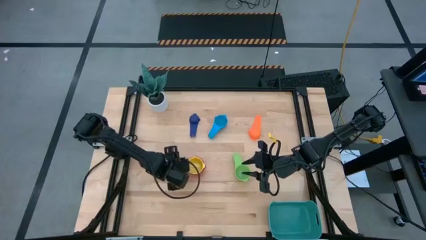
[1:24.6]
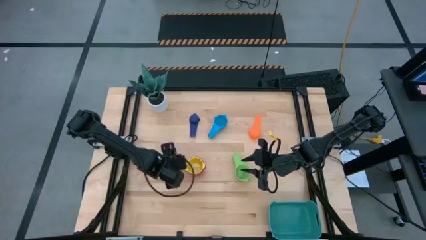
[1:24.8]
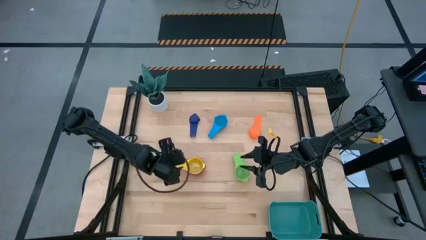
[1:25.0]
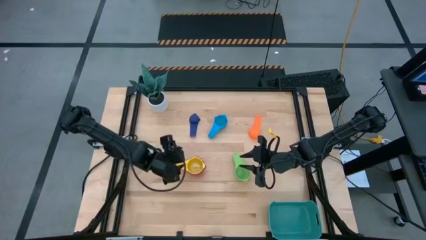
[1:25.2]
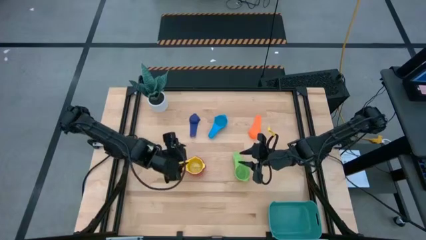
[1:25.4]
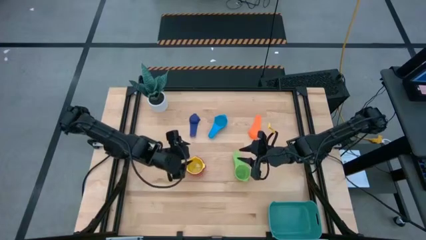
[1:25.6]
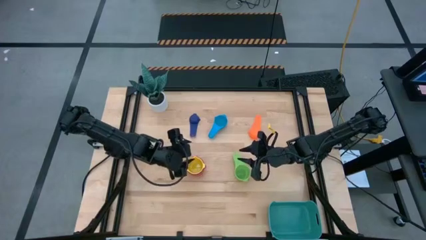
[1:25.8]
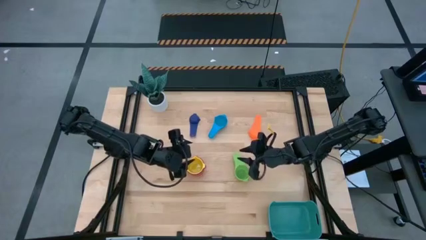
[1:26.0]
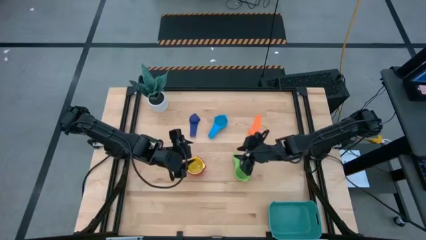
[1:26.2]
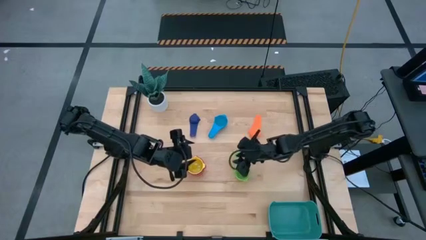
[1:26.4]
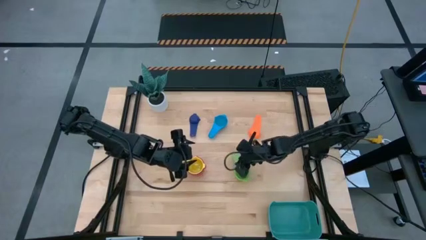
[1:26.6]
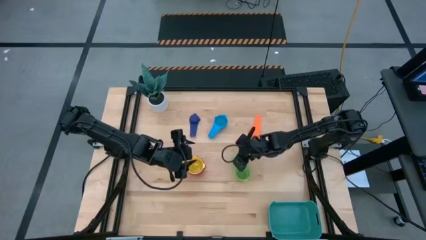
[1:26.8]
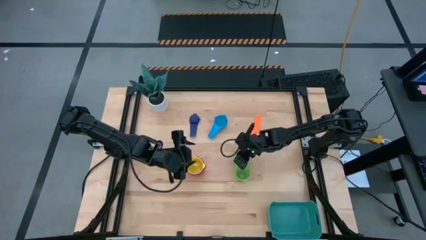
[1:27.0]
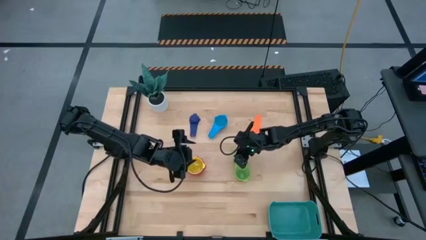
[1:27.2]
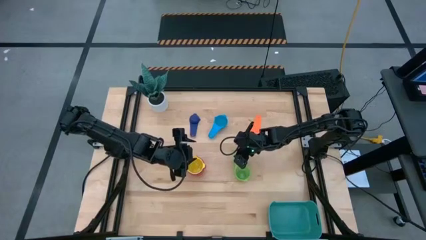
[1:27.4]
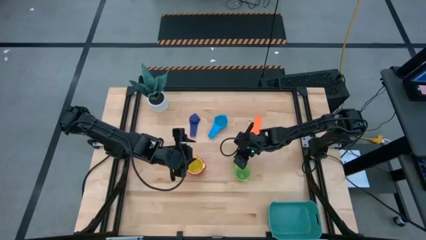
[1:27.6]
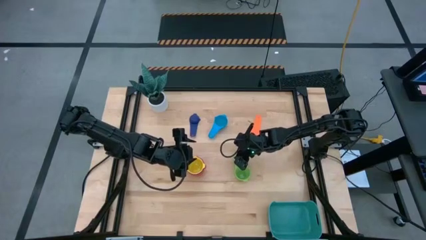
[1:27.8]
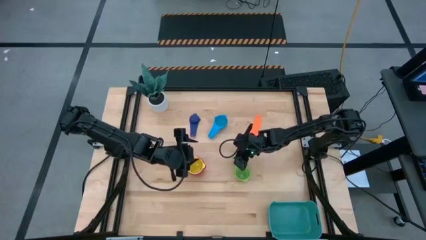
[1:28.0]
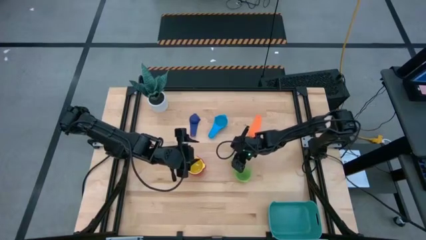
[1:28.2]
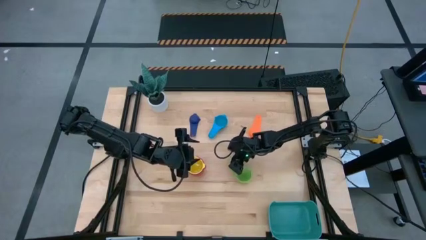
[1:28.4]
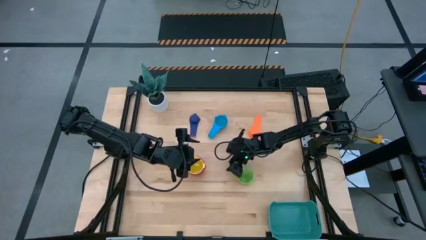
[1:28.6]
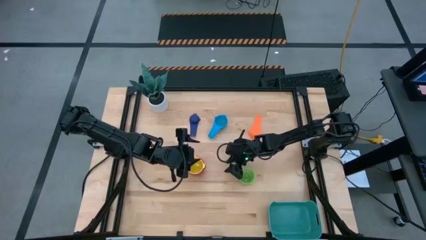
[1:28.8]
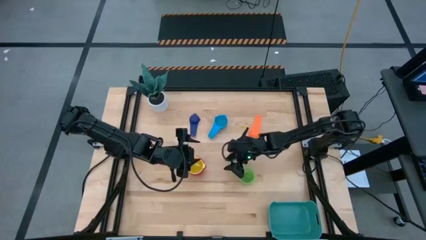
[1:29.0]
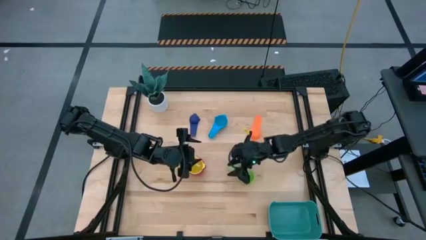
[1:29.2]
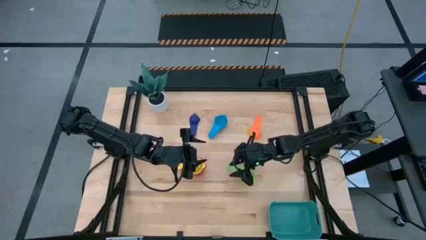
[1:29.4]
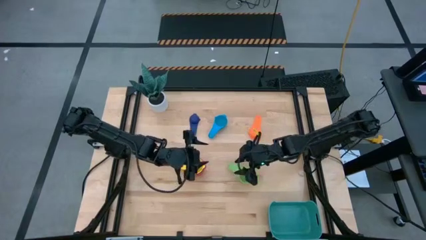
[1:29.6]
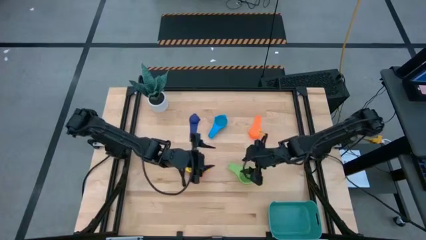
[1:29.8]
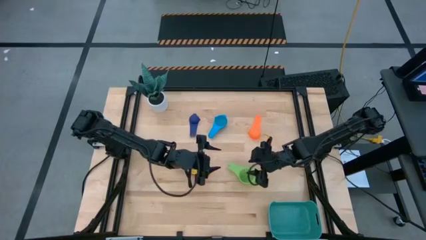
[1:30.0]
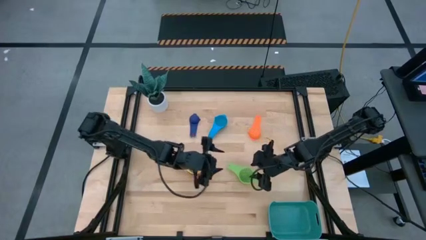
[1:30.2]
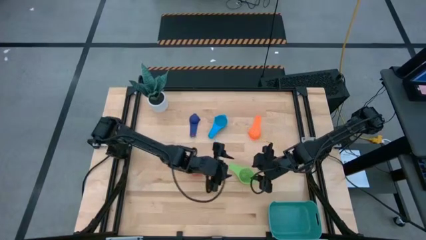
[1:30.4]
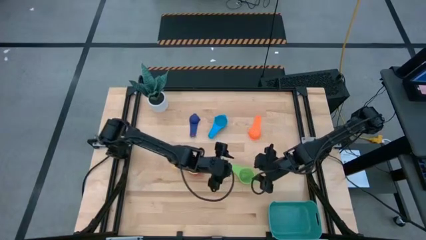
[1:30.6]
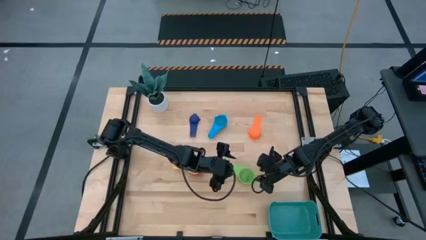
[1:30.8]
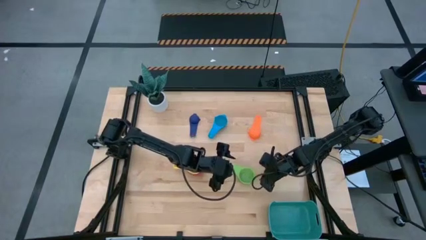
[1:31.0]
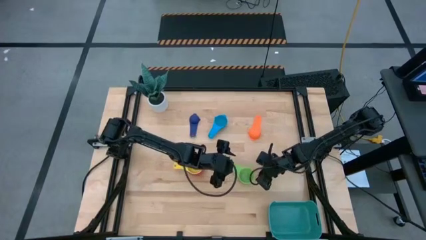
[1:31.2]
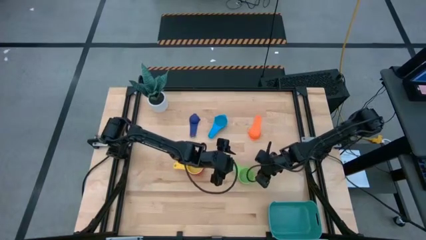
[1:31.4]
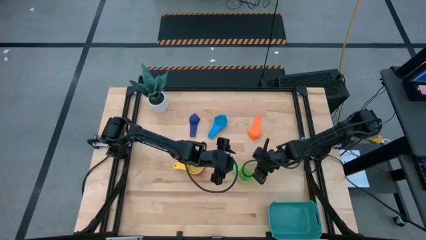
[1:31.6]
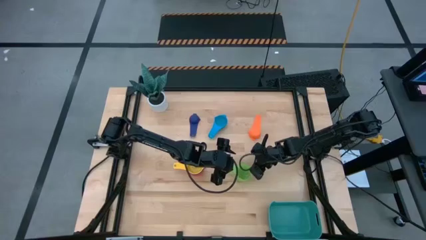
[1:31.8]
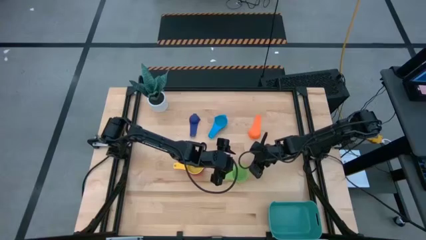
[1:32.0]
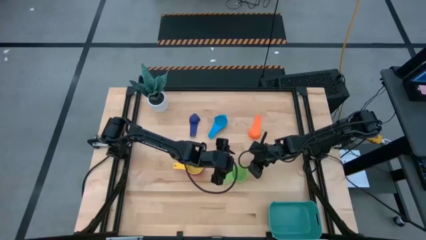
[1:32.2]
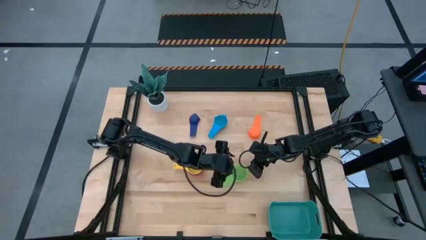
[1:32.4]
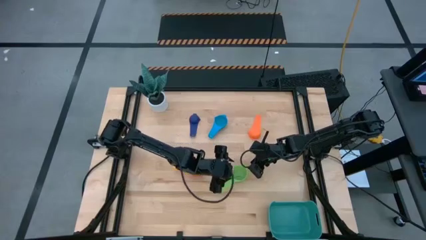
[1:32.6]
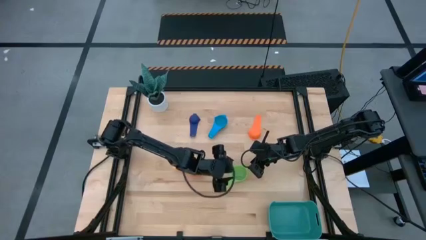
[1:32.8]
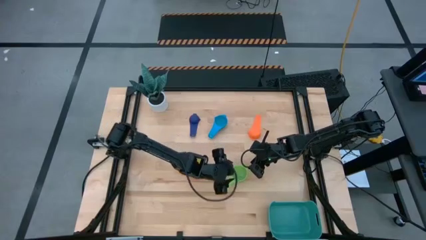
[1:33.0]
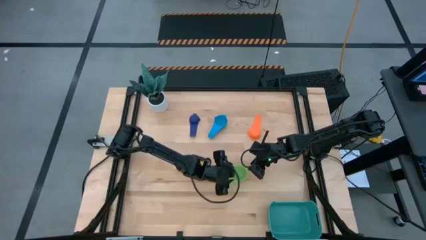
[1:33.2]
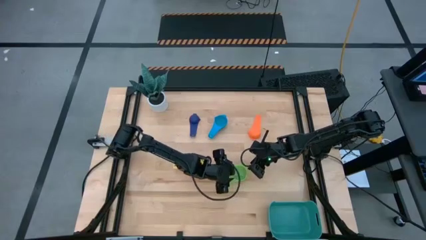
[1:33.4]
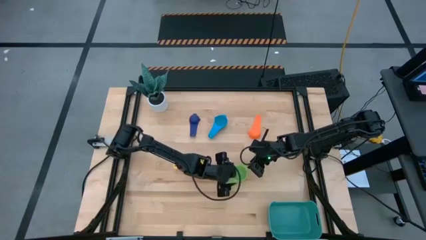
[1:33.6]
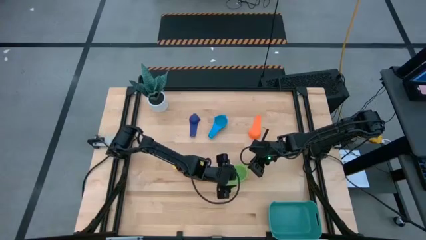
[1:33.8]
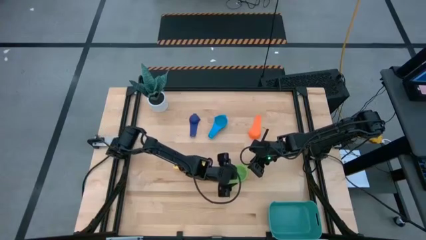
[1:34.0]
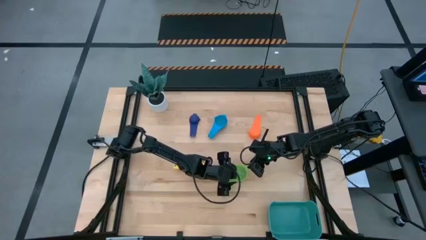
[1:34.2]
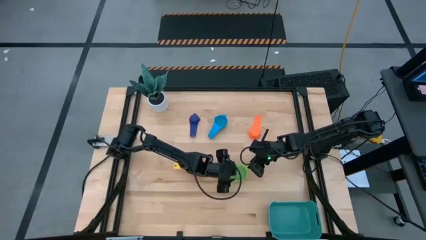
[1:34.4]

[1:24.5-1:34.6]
Task: Nest measuring cups in basket
Stack the green measuring cup on top of the yellow measuring cup

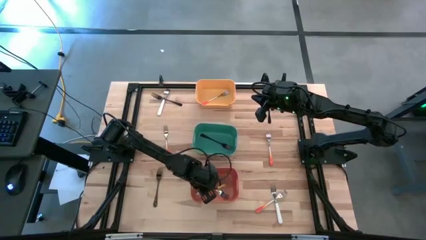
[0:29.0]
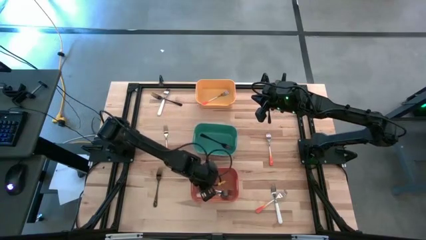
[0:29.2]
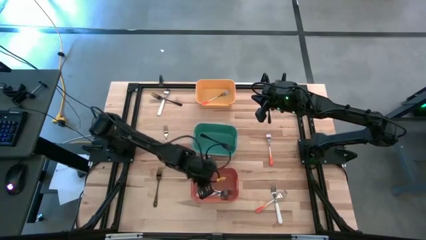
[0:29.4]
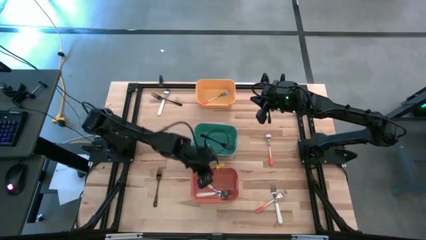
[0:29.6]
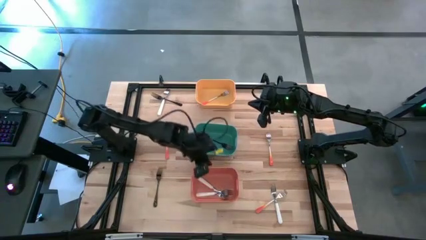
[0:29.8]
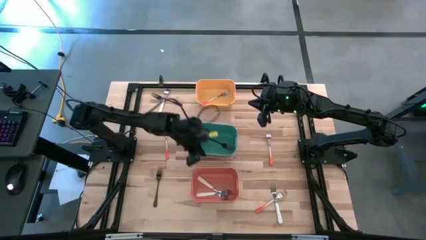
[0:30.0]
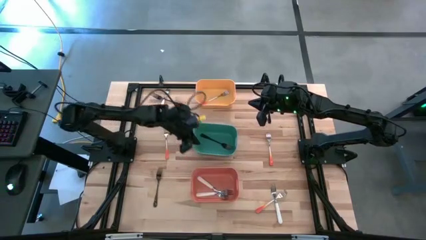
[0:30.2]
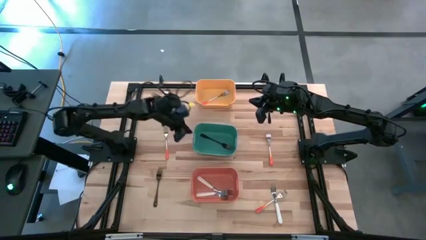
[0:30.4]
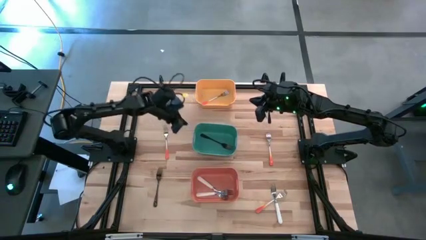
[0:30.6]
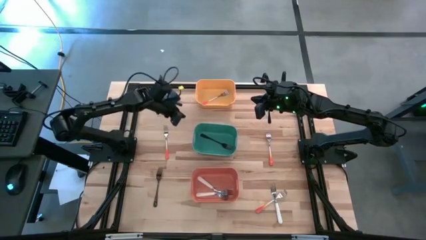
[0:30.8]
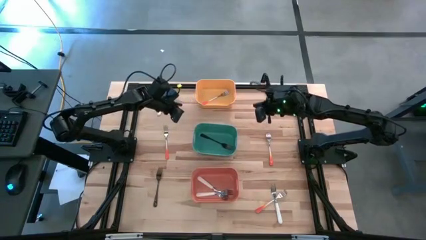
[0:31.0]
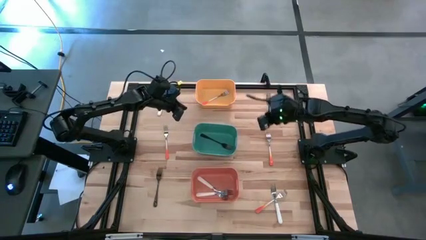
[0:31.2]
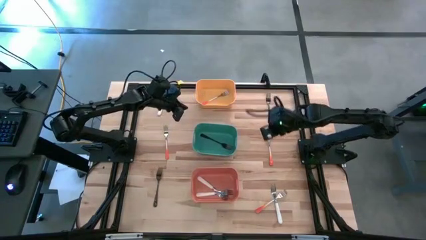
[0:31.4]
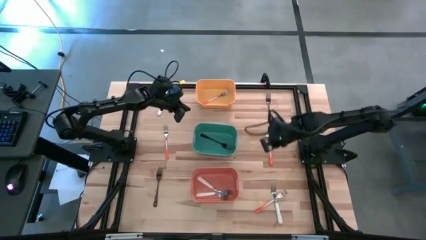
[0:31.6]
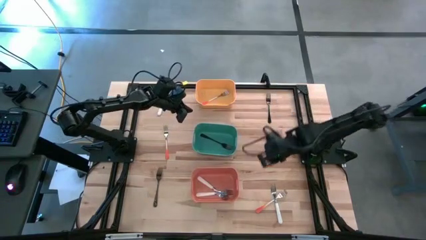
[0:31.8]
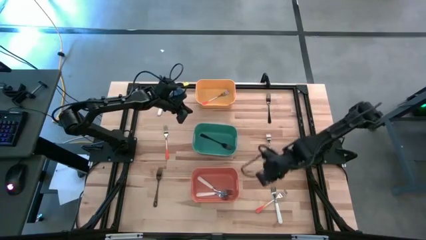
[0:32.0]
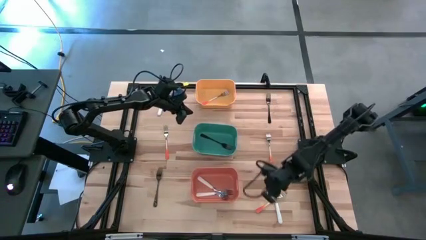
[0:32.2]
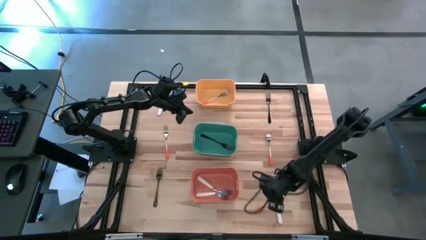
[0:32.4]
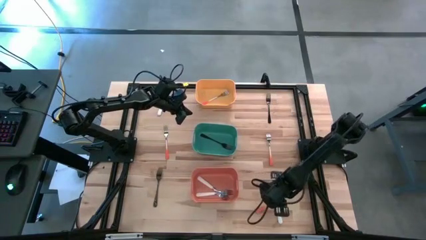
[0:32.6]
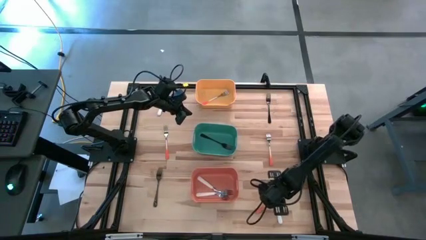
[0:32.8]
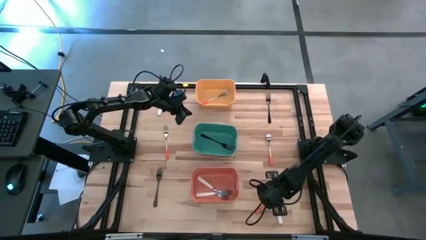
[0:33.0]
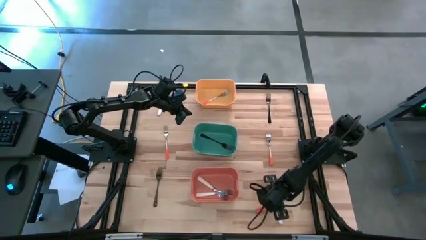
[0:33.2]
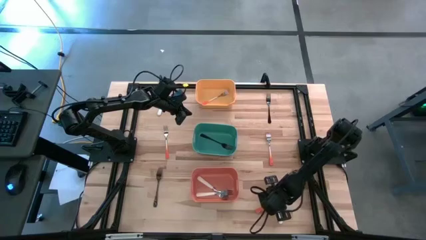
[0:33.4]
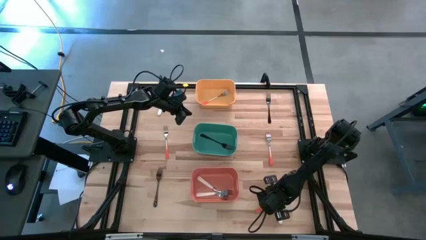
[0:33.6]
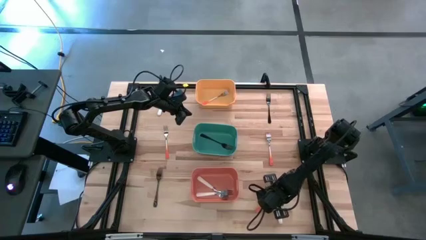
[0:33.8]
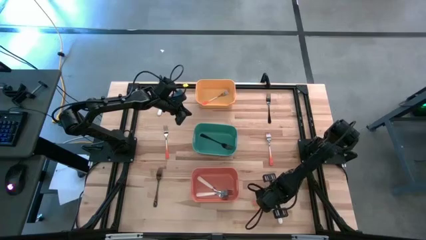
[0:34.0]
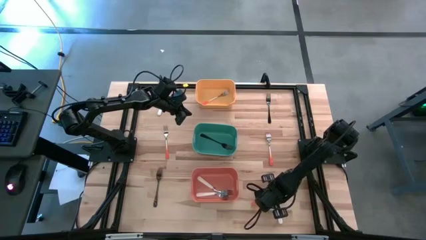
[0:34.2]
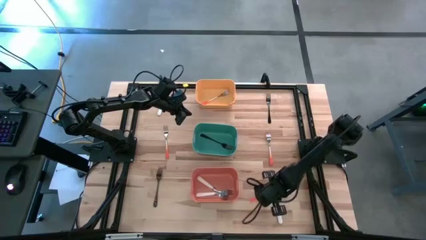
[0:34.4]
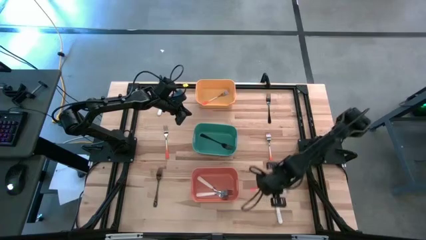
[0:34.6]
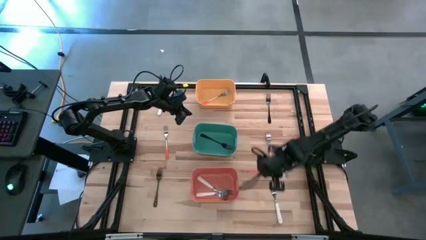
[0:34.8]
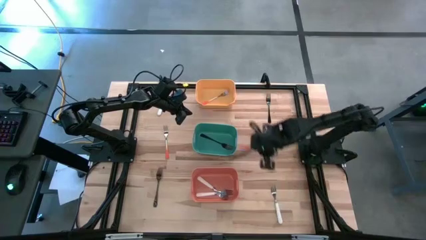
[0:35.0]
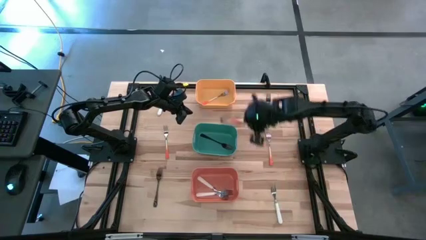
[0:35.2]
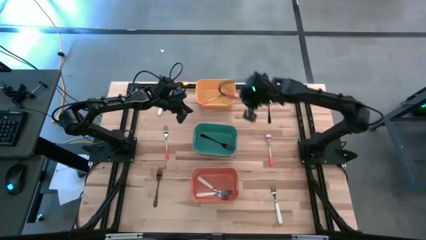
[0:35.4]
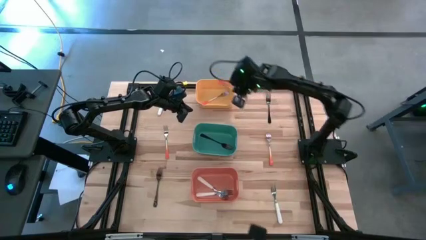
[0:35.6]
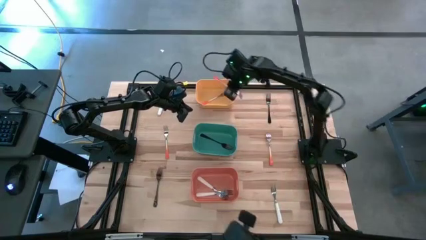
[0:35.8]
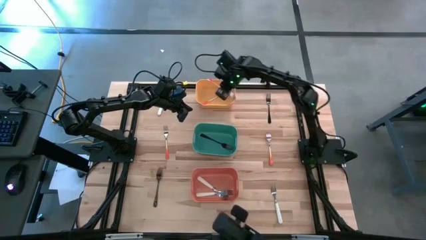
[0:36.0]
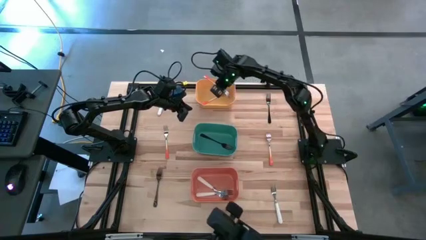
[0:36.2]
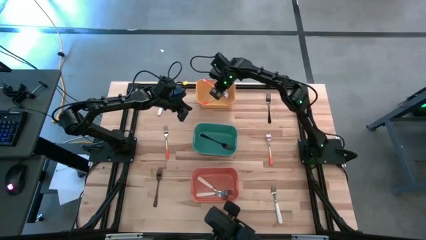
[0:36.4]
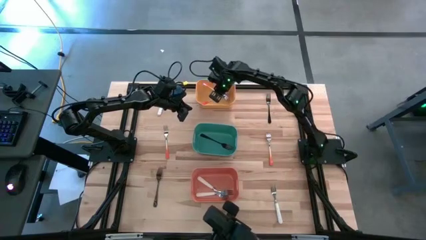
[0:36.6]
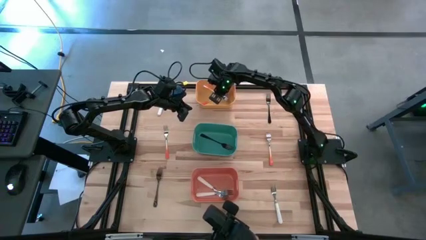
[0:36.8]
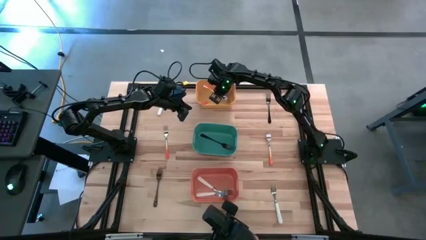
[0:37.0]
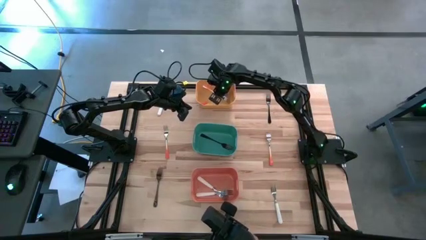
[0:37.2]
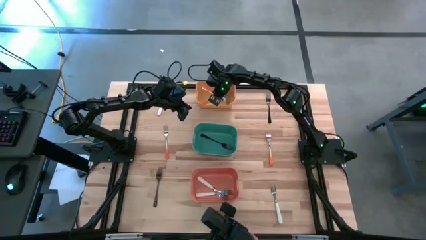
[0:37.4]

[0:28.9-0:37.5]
Task: Sort silverware by color (type)
Put the orange fork into the yellow bin
